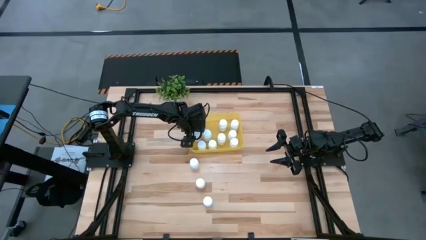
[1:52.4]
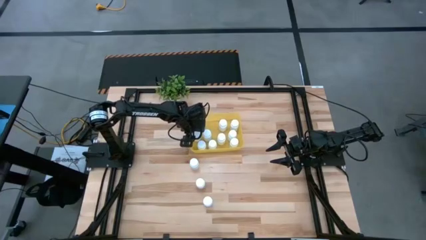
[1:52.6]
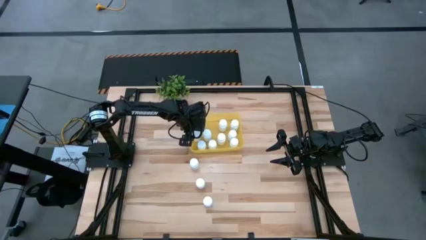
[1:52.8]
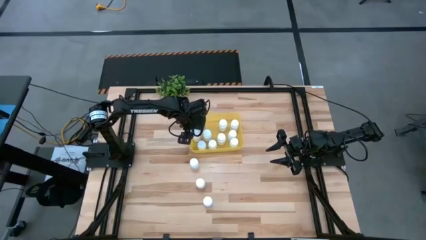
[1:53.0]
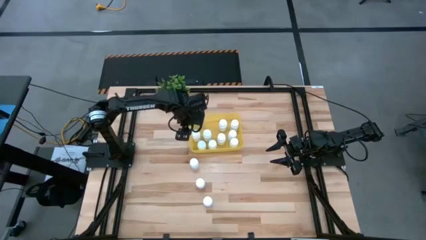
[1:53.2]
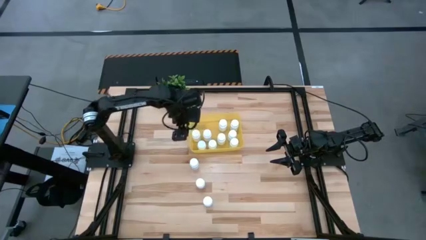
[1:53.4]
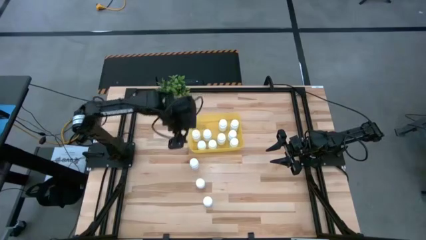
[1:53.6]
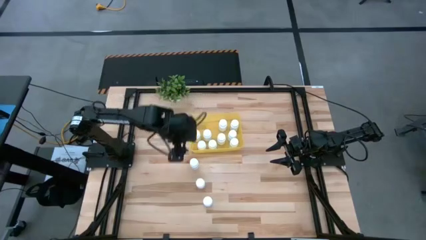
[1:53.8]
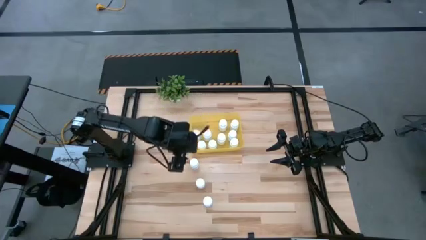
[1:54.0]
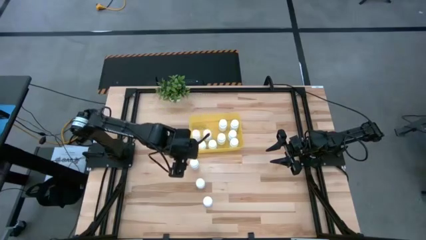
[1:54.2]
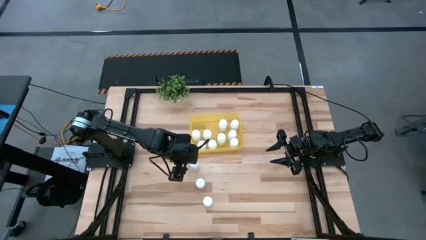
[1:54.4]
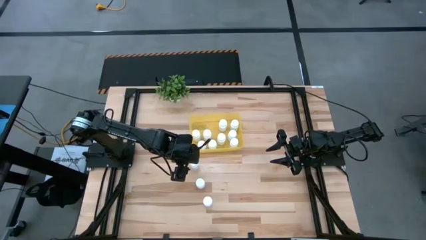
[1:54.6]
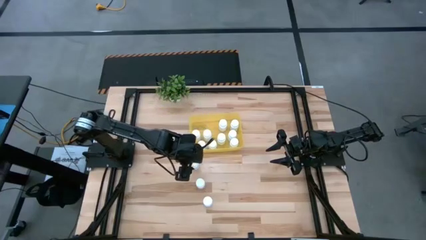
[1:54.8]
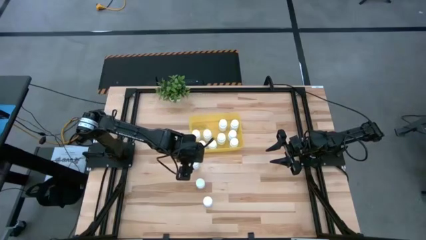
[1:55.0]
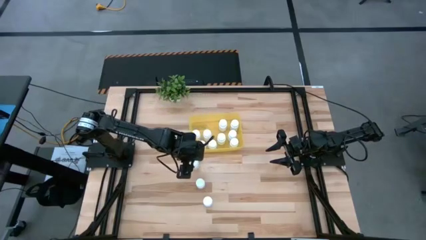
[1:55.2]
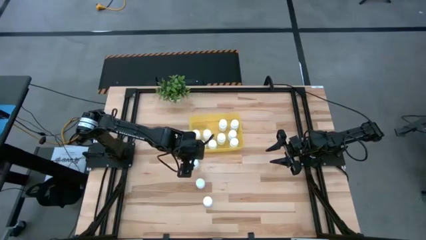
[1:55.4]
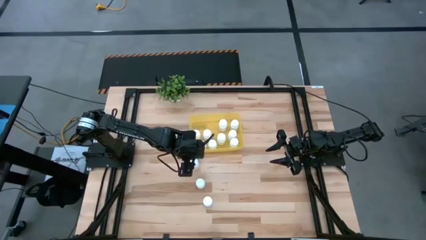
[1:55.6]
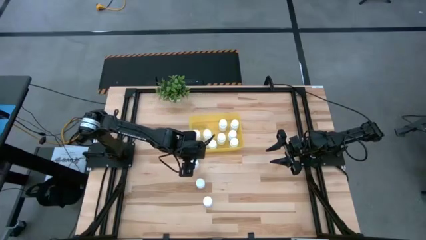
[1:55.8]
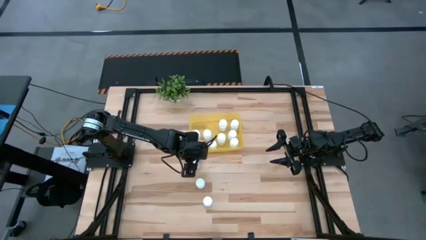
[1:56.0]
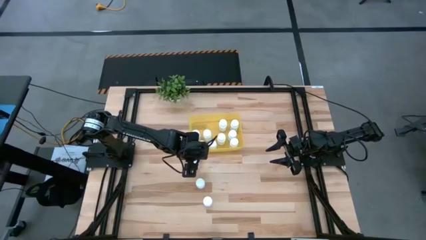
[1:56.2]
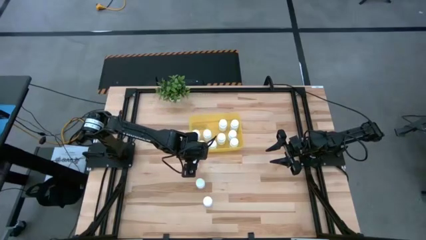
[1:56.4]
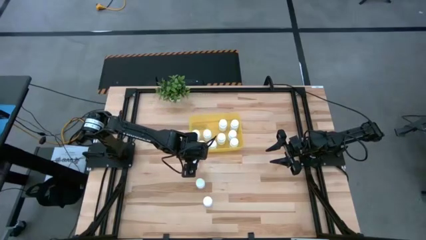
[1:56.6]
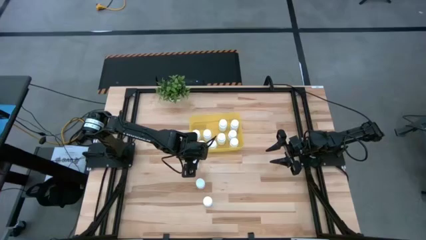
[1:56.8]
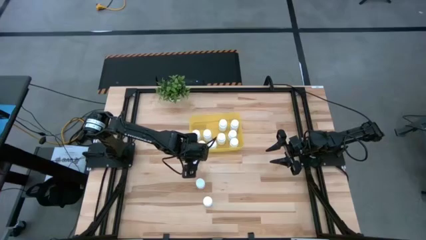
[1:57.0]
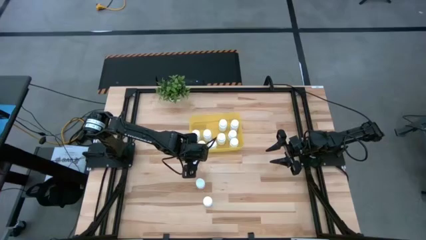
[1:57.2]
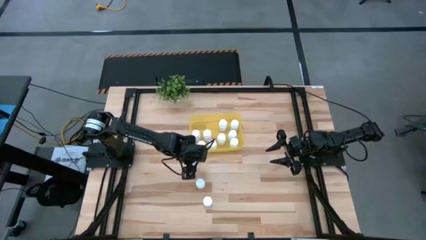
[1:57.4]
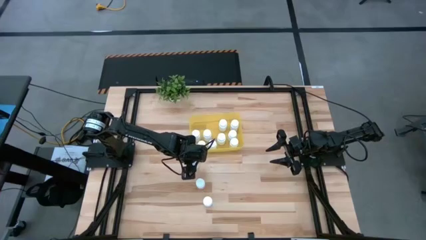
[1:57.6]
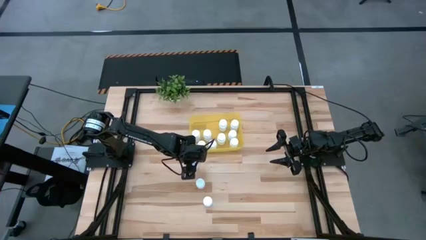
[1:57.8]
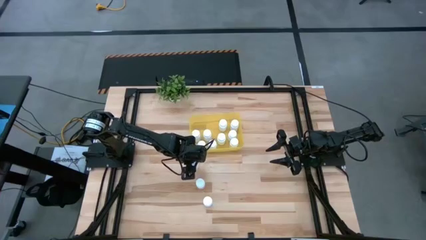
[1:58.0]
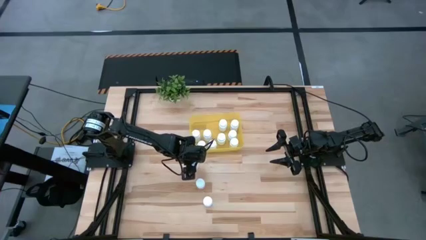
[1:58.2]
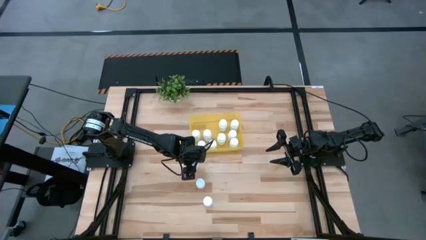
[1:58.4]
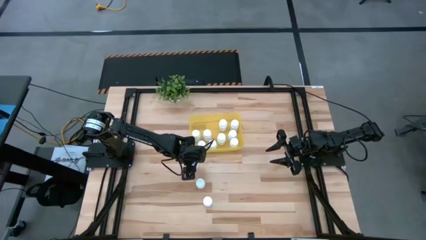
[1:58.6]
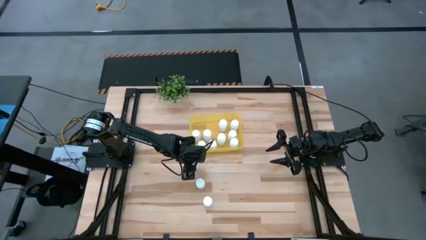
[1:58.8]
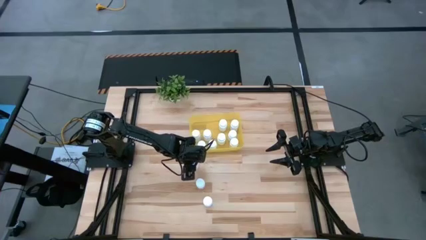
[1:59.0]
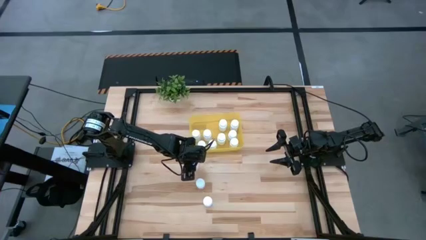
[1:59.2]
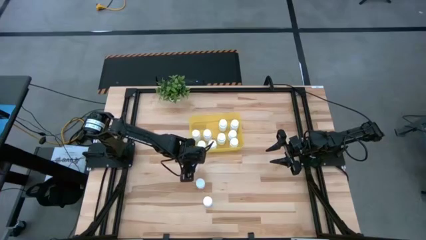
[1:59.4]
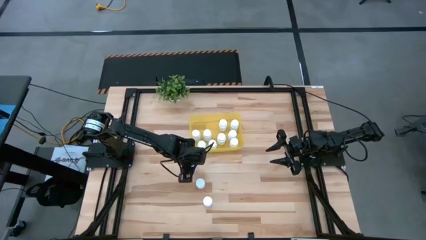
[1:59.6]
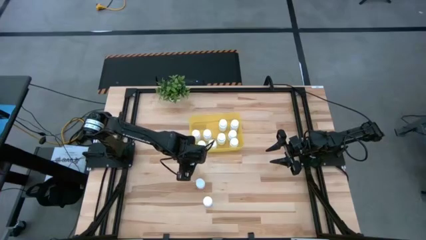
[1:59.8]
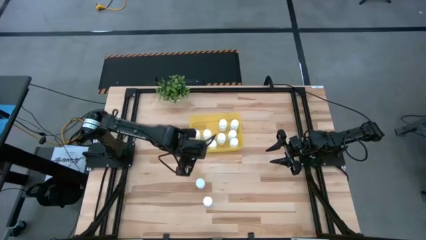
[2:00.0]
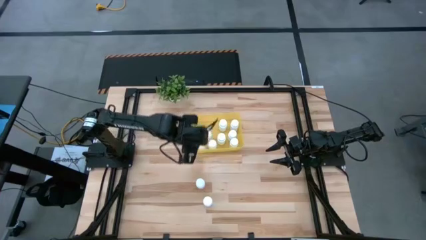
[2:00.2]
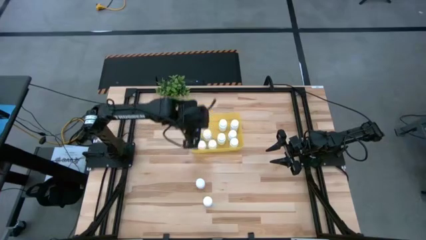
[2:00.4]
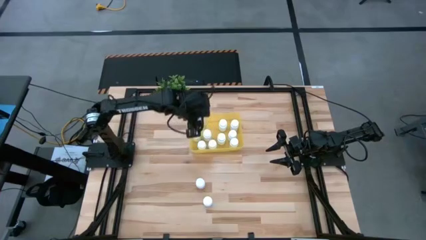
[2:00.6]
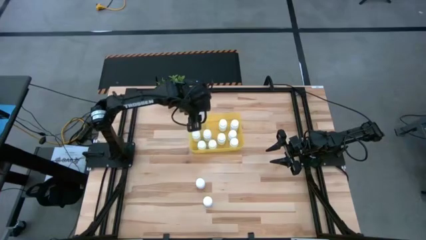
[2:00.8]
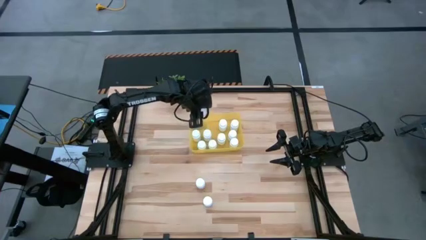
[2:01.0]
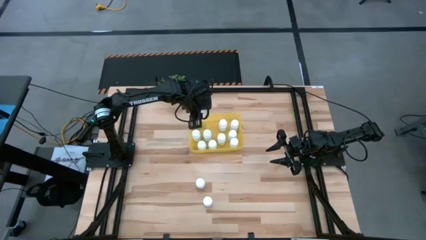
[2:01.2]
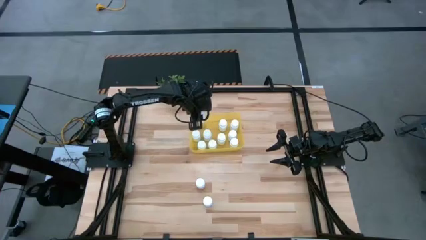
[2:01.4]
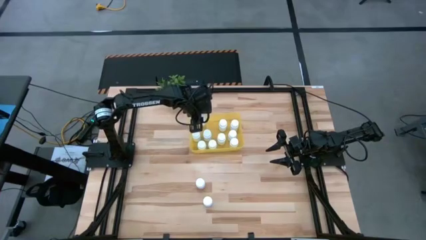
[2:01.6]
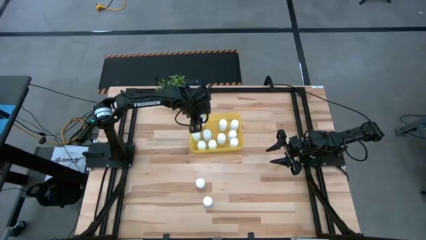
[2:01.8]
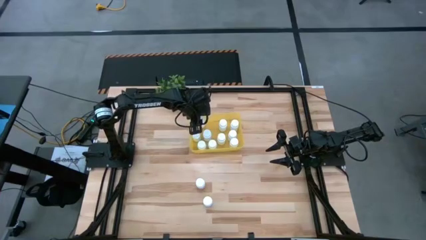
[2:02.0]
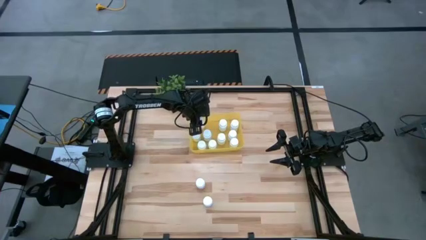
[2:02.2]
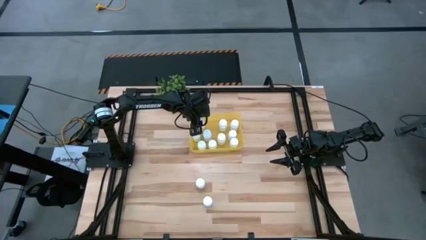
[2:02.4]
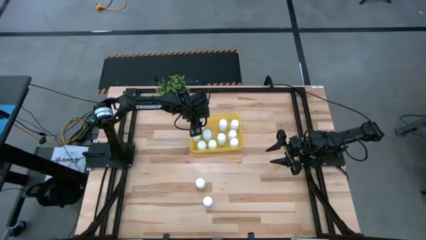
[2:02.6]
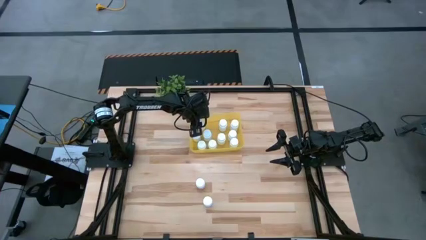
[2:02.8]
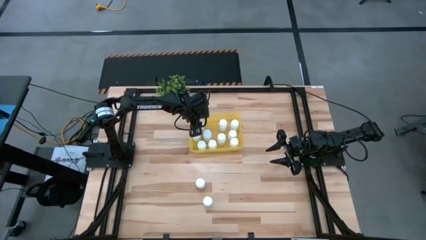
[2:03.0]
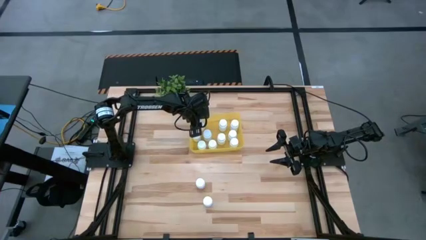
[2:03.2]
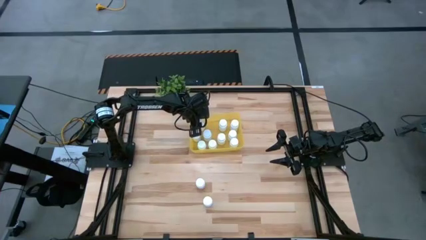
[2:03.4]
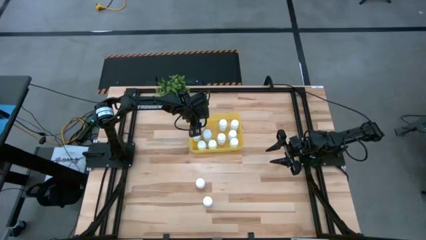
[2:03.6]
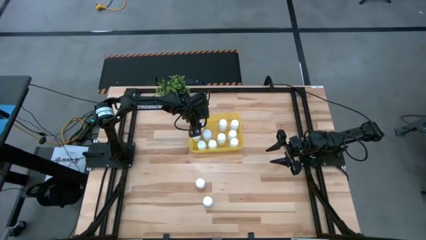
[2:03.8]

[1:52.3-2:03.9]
Task: Pick and place pill bottles into a basket
Put the white medicine bottle into the yellow bin
